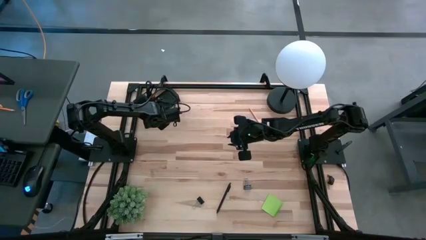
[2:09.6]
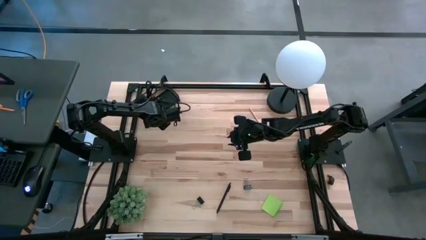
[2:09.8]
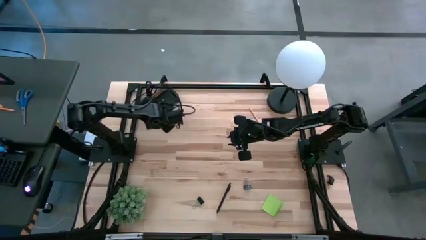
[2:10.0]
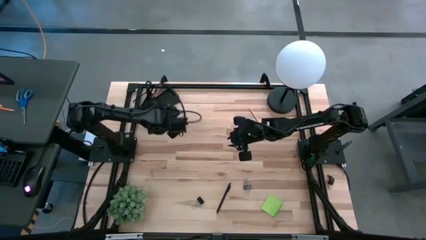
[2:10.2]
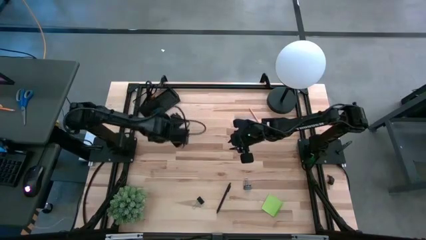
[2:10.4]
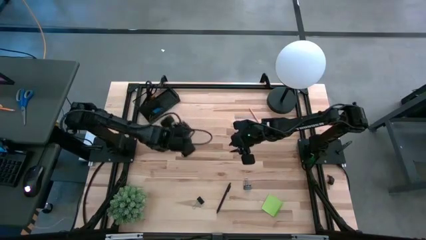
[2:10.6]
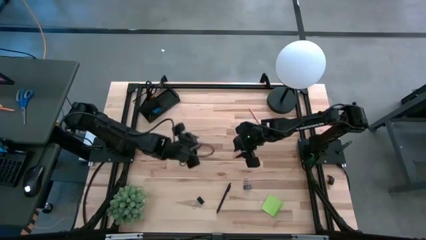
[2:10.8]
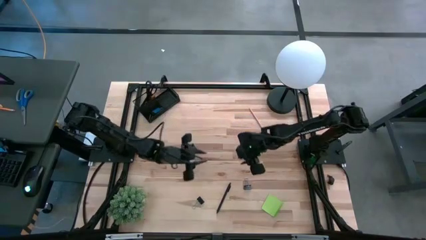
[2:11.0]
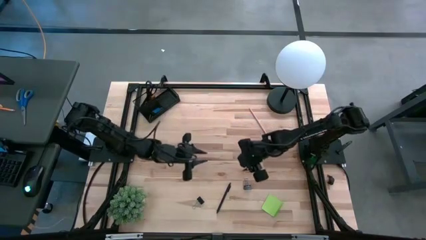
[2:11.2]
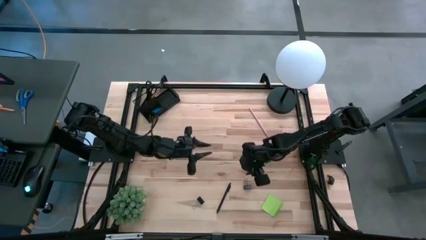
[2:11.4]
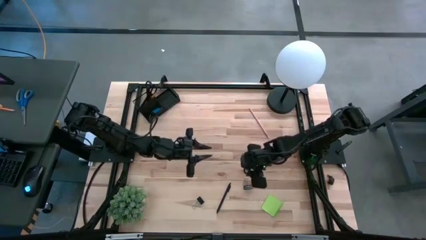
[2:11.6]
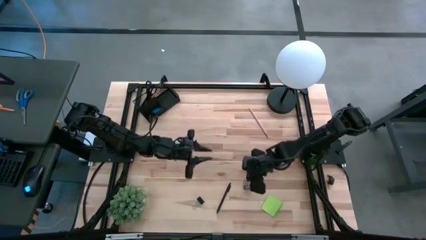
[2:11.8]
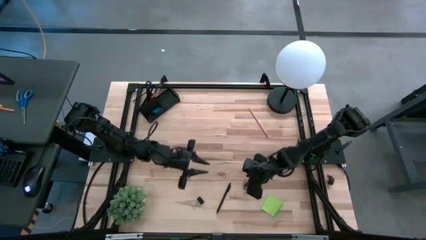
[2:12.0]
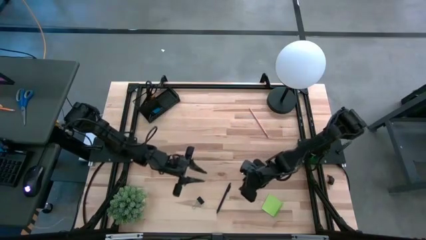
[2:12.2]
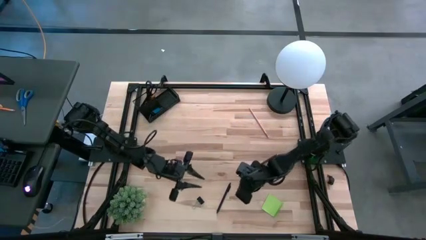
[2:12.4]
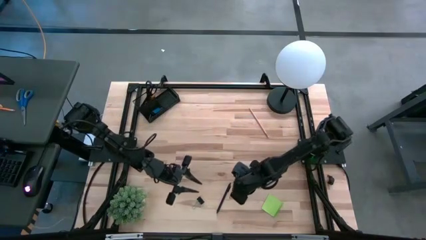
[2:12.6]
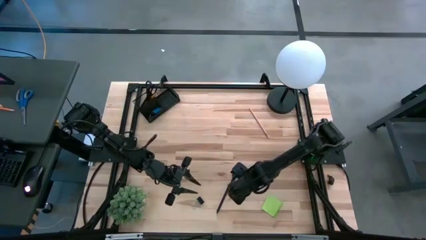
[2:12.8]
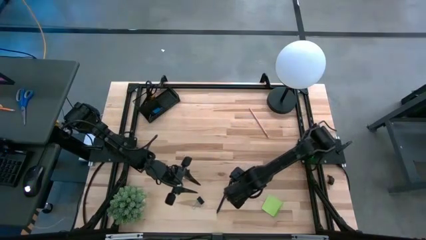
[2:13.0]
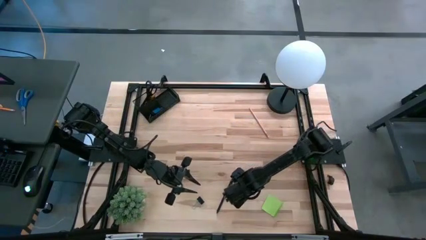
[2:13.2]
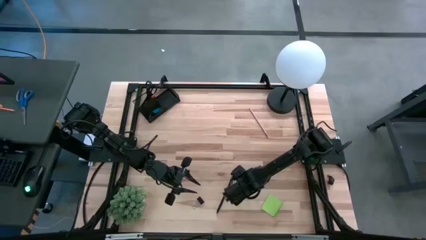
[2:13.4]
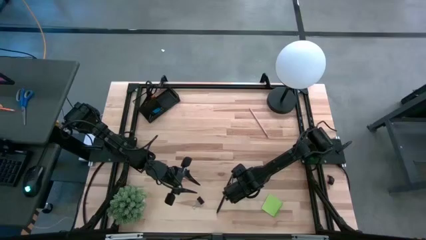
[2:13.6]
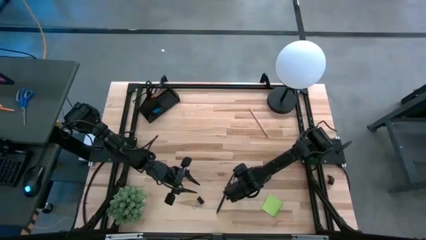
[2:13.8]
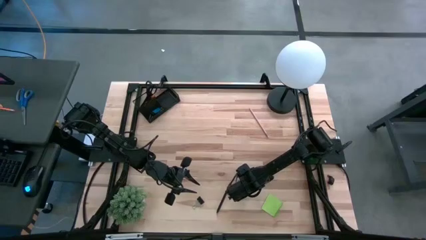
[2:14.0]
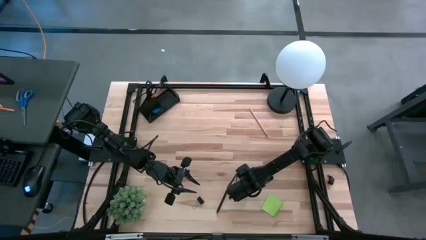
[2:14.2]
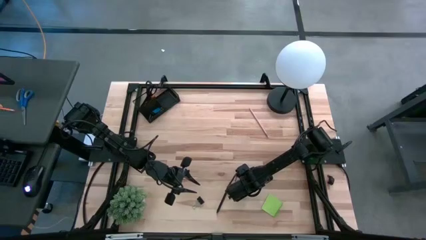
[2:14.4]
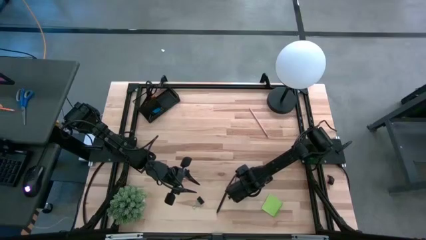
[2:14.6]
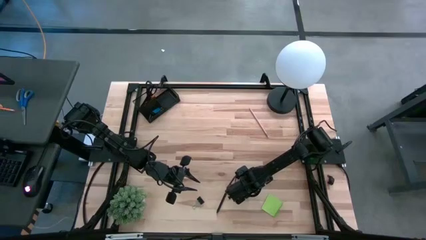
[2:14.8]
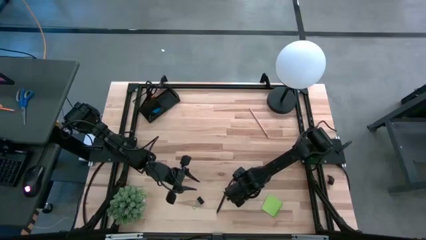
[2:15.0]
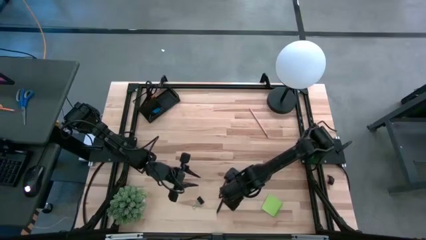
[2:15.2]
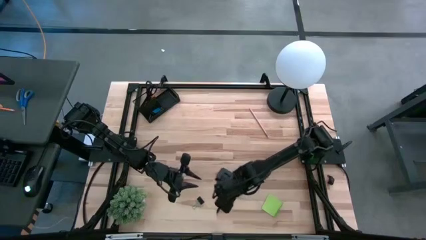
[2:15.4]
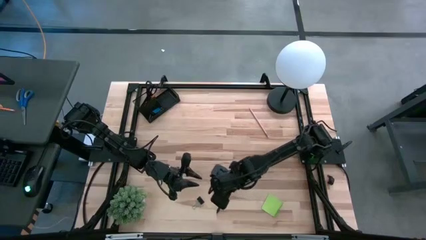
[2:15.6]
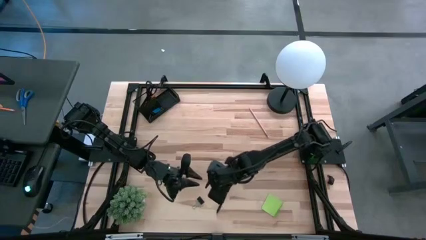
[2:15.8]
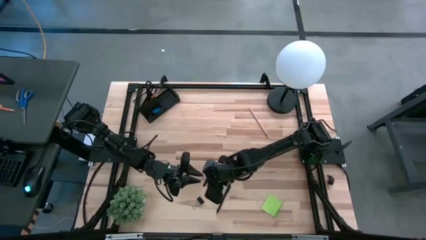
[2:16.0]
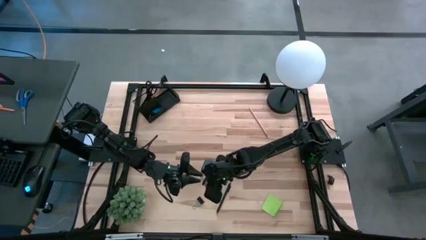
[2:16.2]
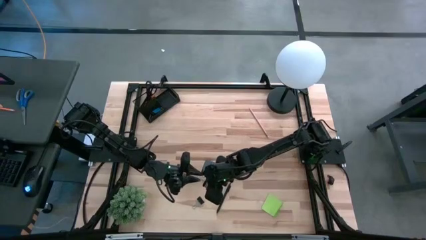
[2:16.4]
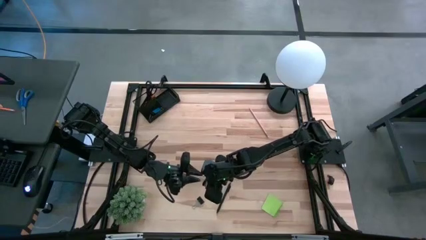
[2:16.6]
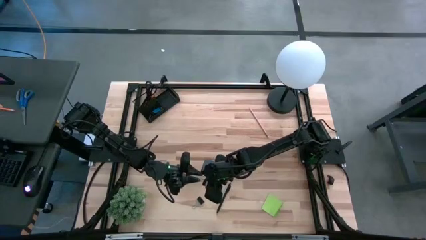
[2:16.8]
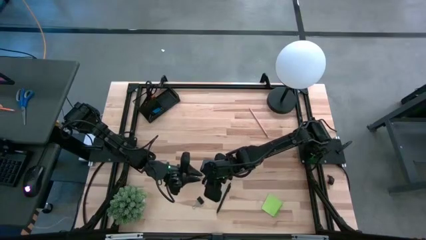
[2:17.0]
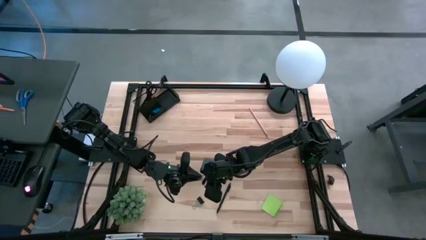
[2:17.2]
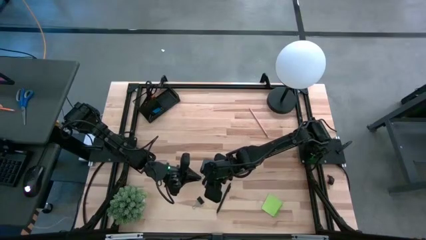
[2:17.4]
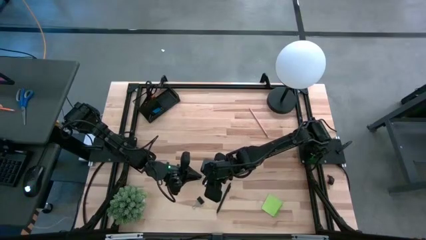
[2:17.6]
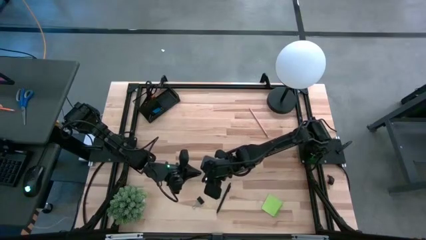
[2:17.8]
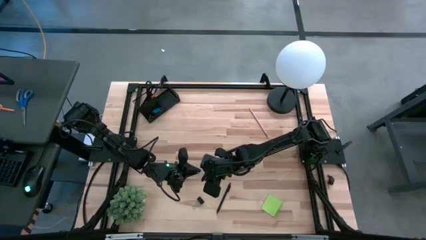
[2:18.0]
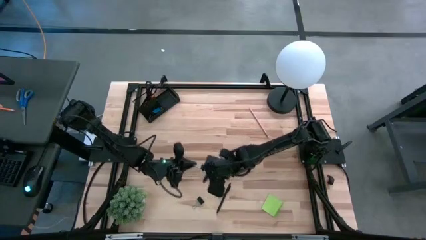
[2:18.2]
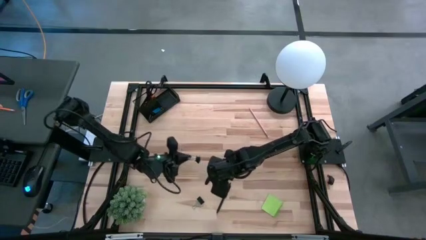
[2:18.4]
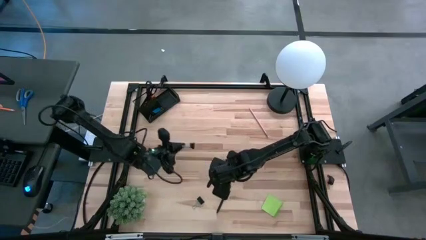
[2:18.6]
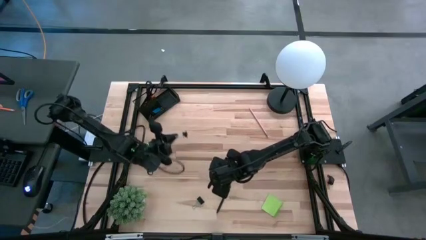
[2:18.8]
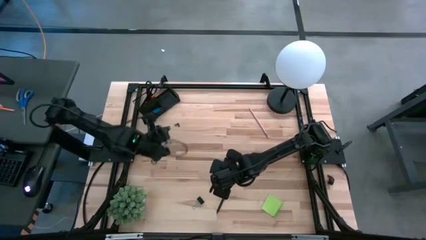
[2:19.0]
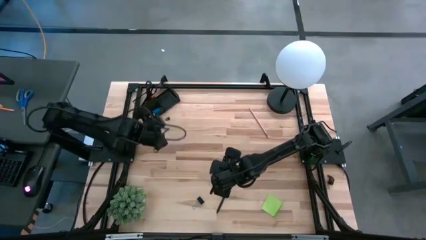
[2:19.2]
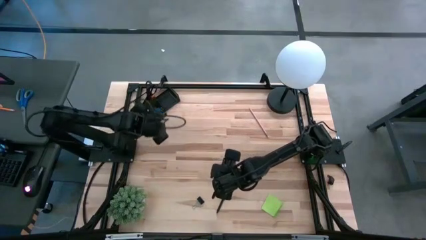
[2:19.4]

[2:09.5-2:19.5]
Task: Pick and place office supplies into organizer
Put the black binder clip into the black desk organizer

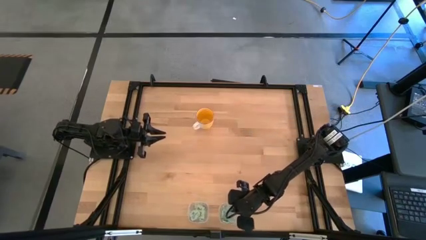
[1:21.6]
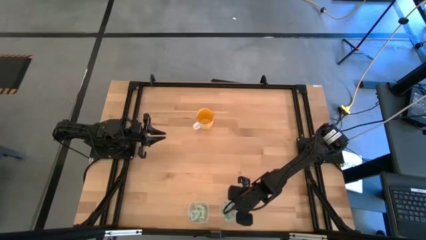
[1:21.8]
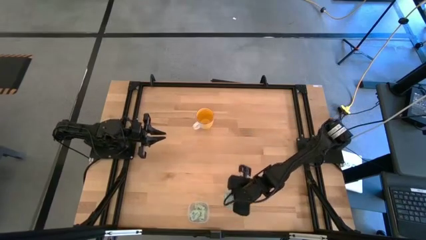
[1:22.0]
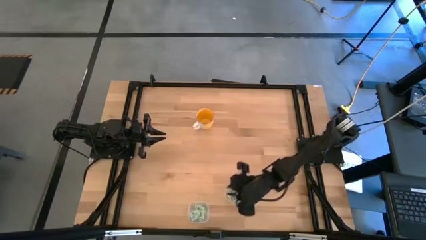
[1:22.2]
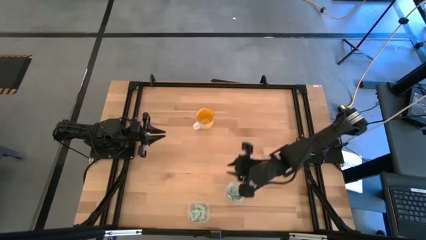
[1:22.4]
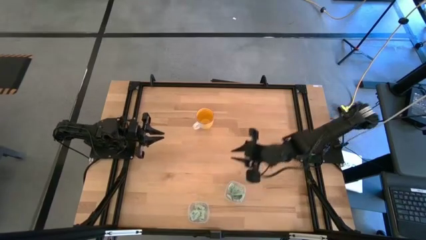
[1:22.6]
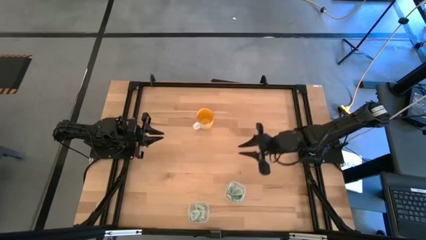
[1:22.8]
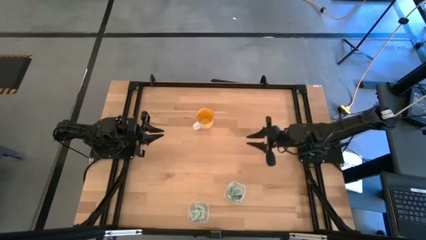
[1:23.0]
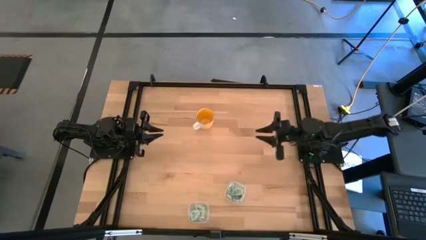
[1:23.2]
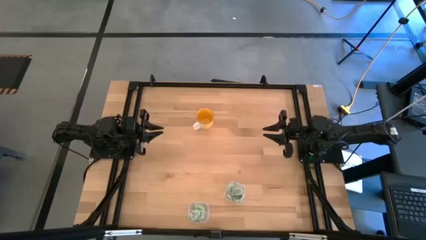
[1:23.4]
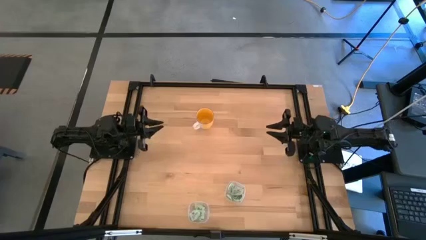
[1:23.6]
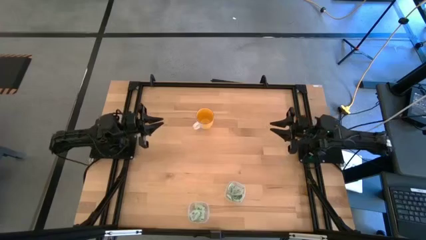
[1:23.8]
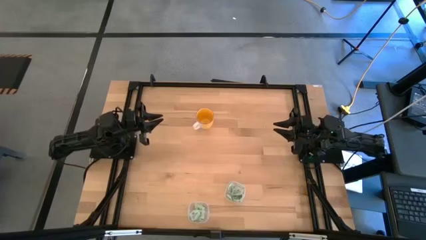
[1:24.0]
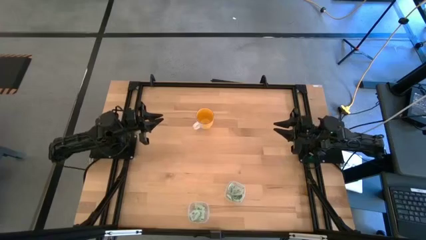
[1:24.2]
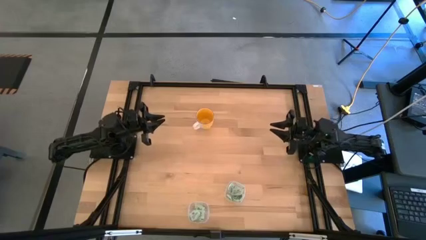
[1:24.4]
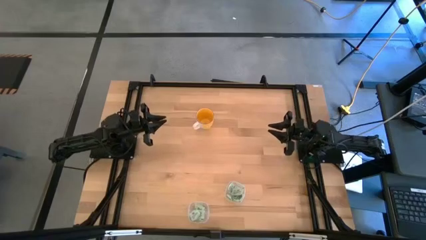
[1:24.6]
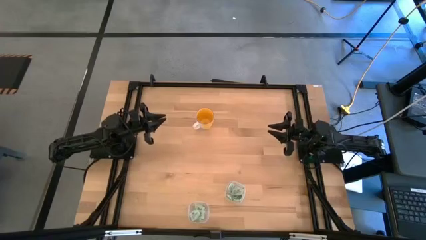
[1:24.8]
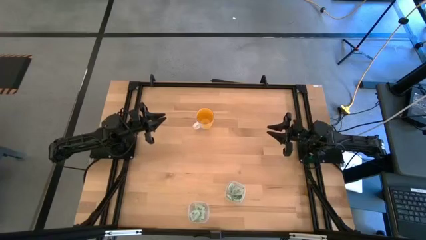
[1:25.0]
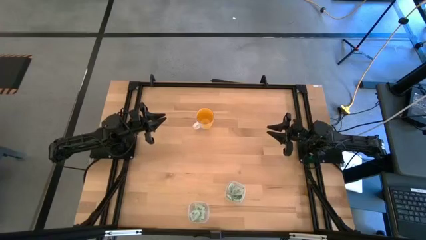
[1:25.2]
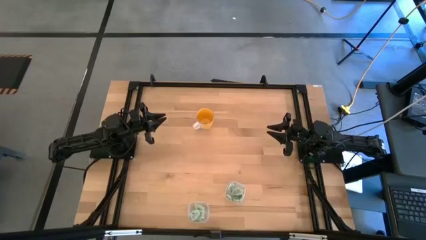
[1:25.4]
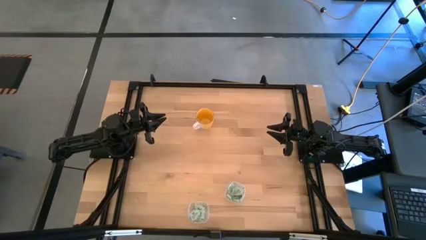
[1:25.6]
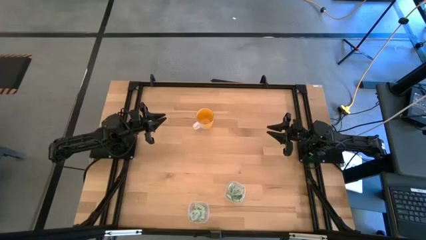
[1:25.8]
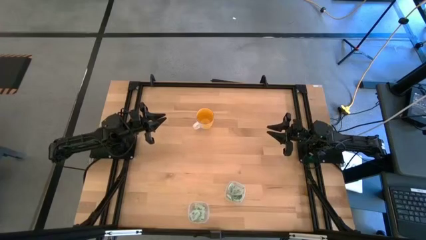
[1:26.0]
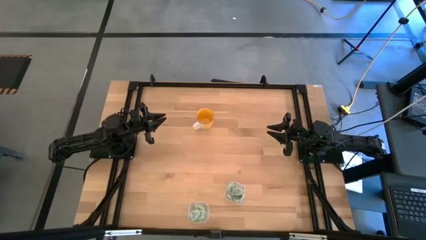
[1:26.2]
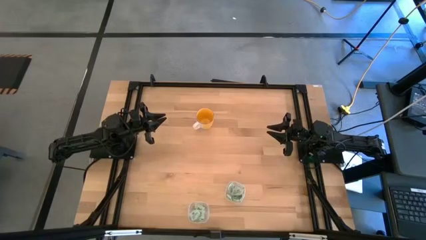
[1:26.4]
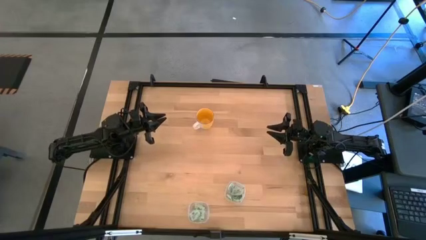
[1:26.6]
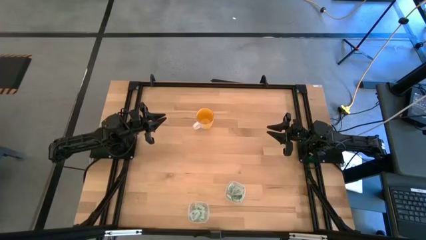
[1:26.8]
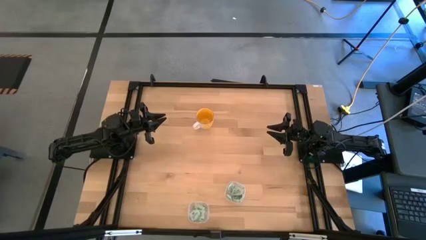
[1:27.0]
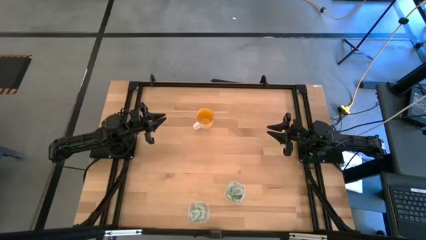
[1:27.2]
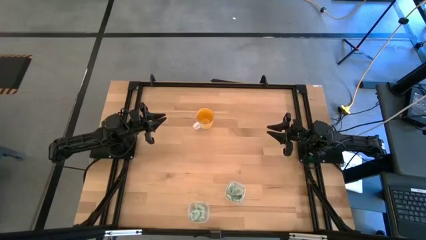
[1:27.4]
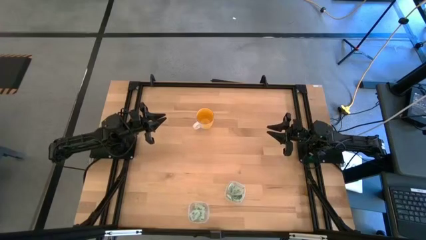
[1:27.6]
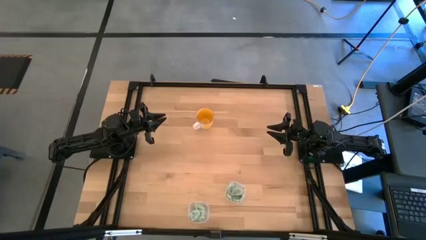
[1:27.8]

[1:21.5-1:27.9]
Task: Pick and place items into bin
Return to Home Position
